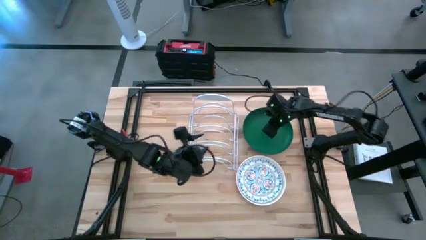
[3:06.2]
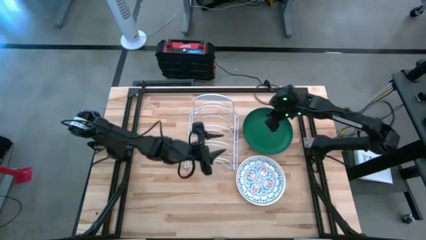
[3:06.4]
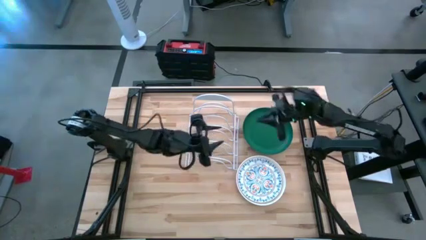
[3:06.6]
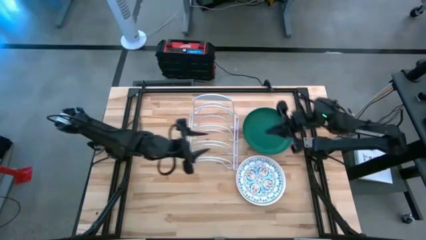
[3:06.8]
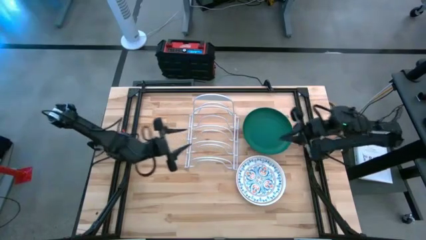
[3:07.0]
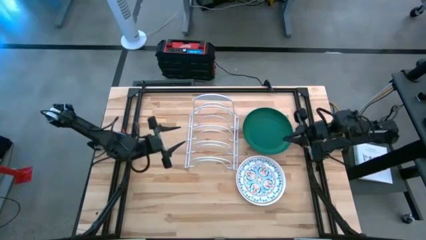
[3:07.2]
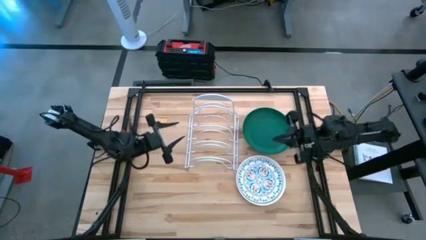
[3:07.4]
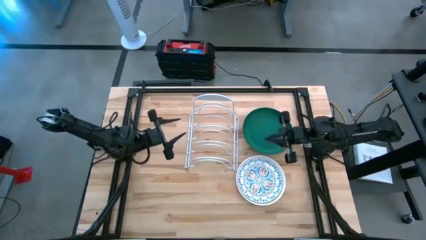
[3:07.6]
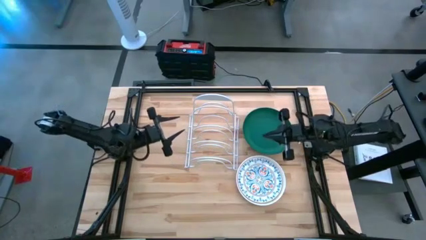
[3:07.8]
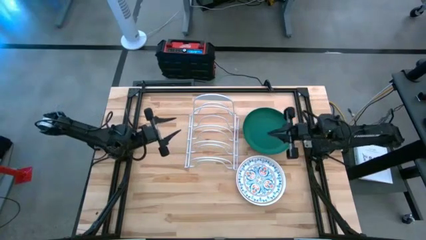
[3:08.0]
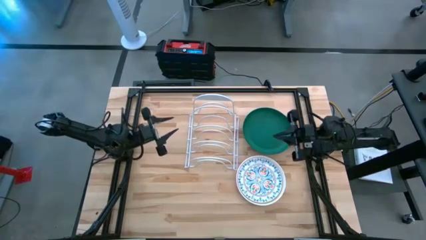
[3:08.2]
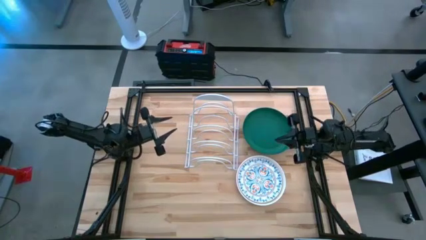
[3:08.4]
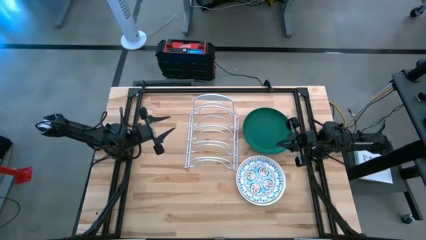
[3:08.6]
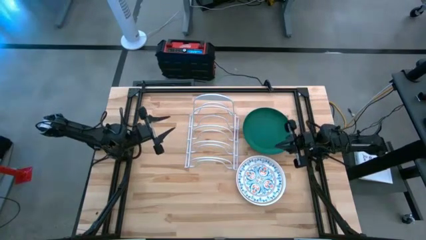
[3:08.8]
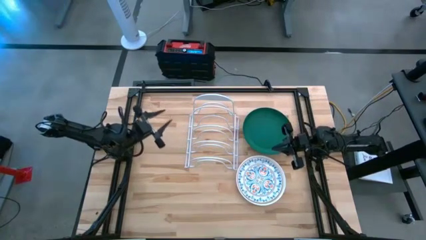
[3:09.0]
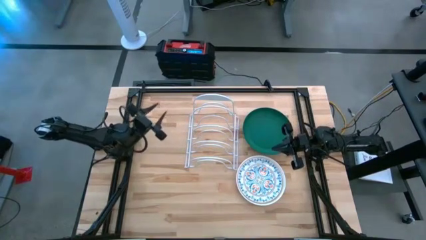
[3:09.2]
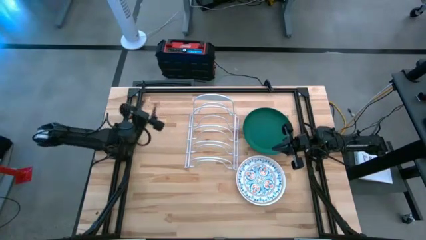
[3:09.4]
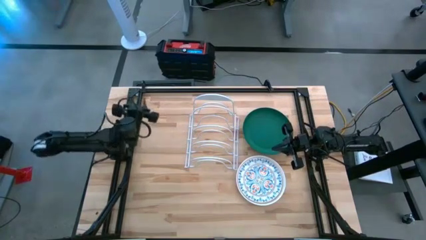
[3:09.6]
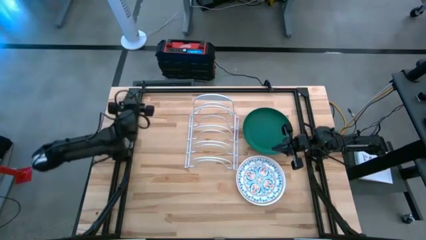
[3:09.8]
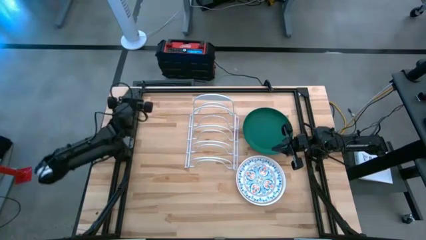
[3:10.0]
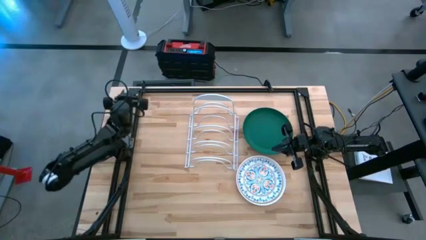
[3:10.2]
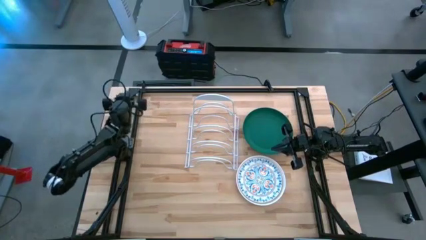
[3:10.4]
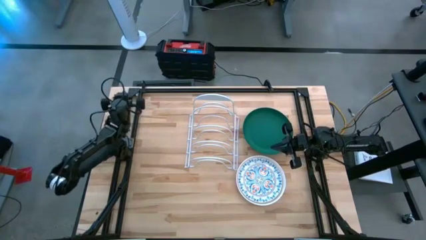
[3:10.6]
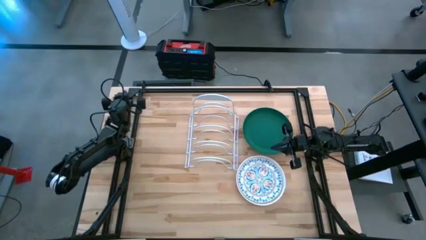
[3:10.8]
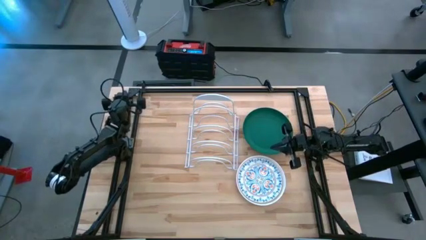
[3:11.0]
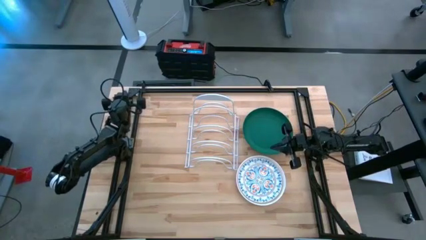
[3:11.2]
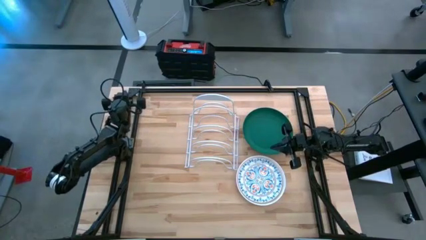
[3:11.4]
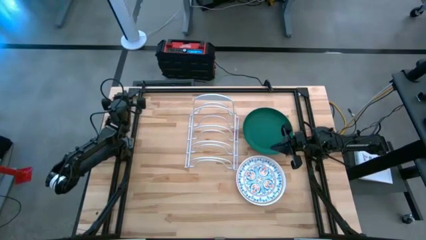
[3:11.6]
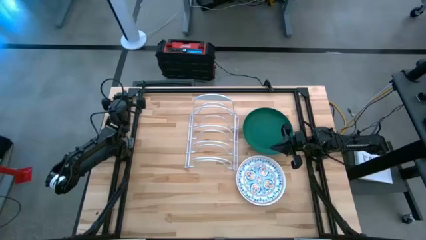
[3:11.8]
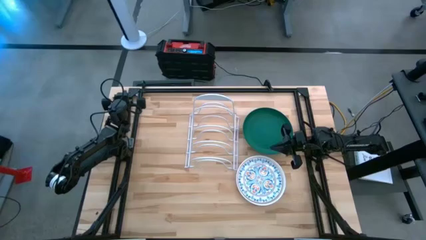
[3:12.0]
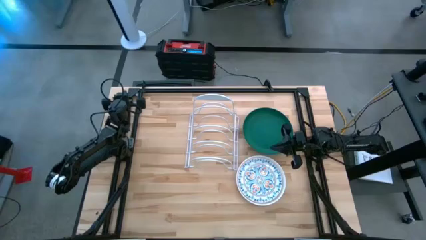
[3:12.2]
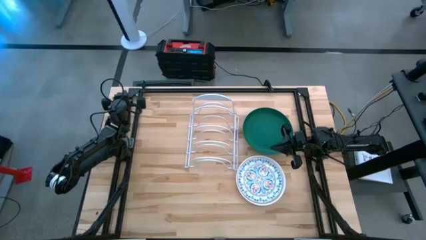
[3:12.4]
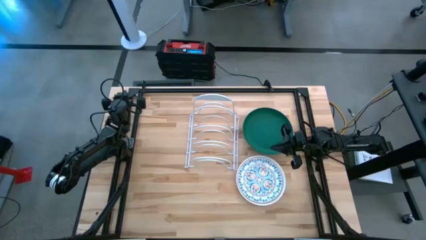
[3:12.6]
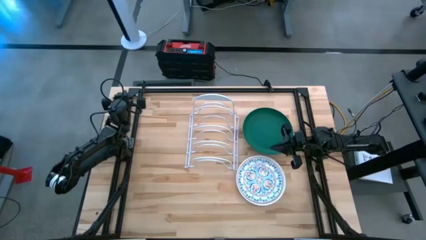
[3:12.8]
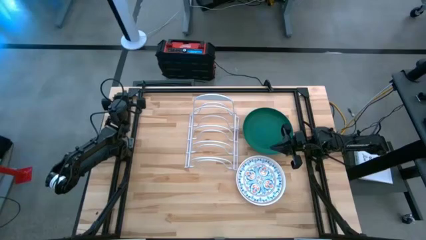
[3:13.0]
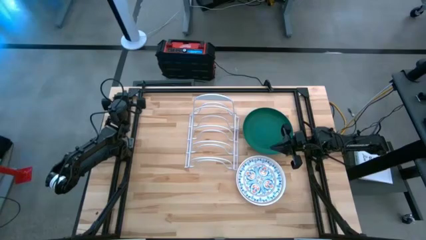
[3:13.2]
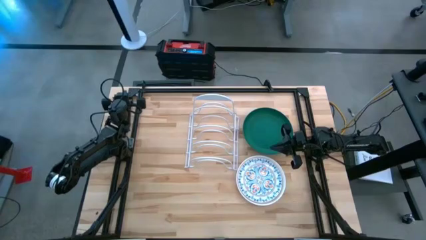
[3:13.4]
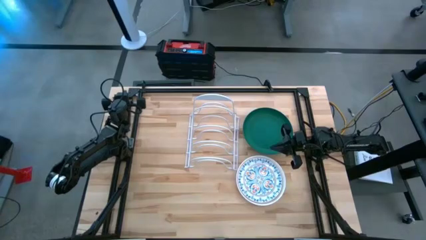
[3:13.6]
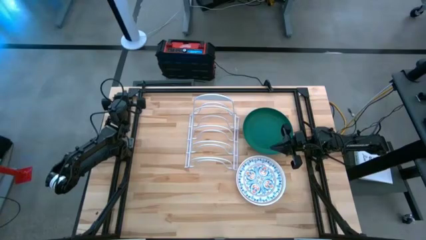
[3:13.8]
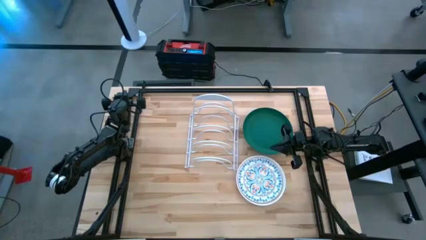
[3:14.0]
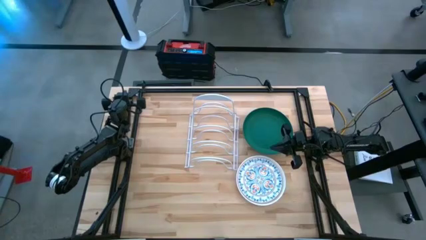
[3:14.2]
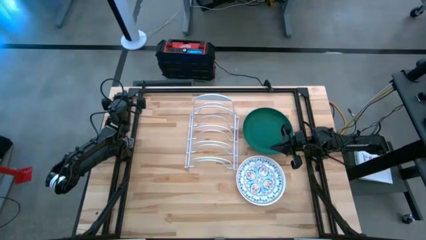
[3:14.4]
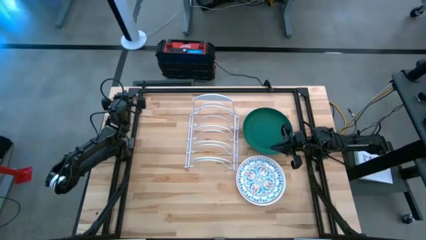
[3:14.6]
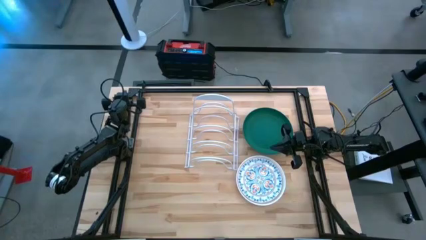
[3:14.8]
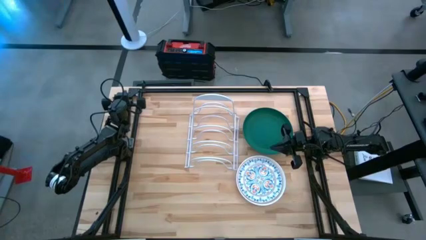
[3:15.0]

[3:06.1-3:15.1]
Task: Sort dishes
Return to Home Position

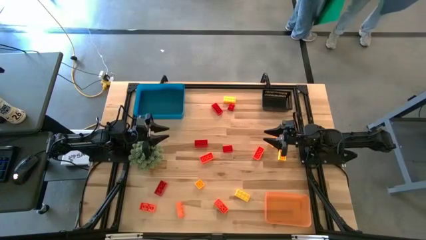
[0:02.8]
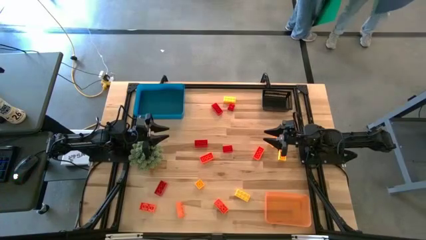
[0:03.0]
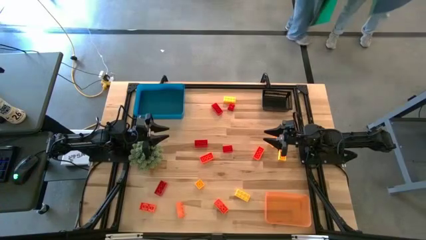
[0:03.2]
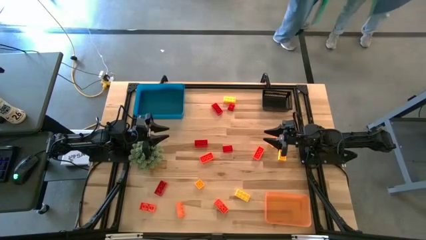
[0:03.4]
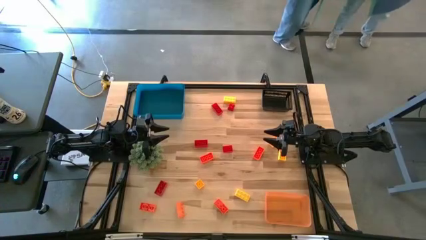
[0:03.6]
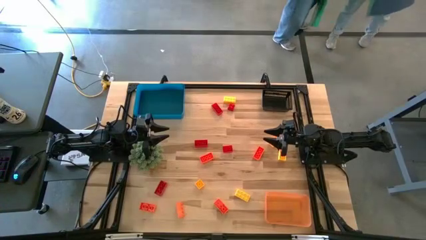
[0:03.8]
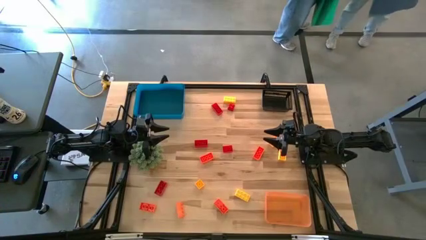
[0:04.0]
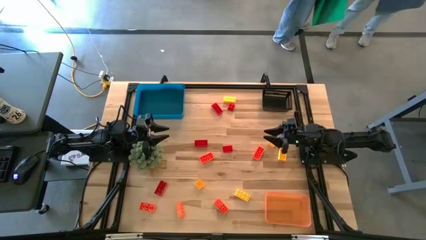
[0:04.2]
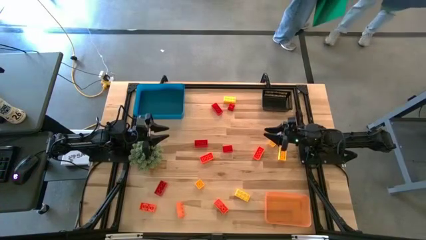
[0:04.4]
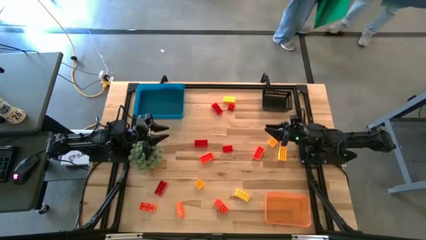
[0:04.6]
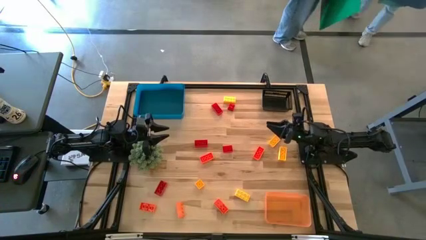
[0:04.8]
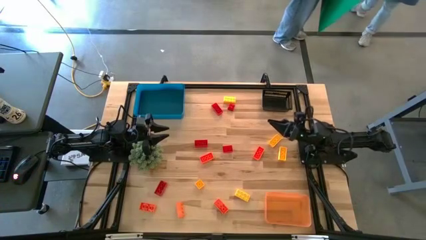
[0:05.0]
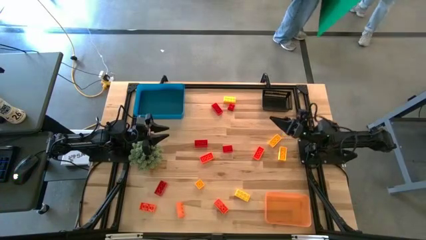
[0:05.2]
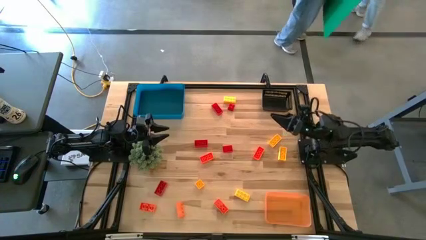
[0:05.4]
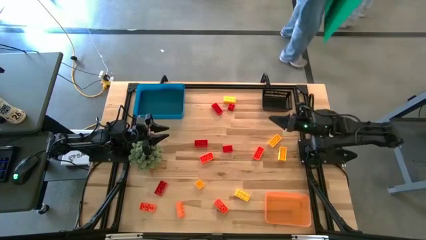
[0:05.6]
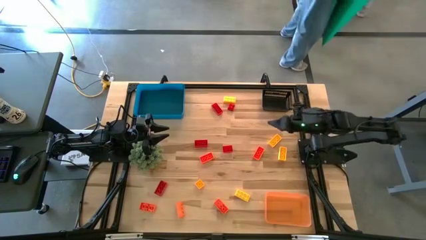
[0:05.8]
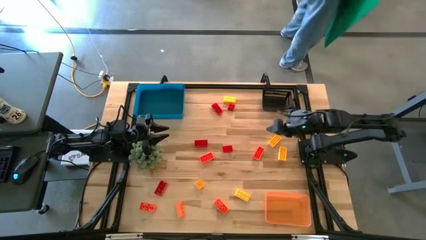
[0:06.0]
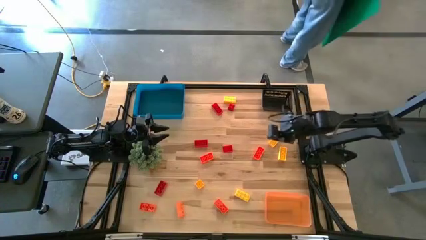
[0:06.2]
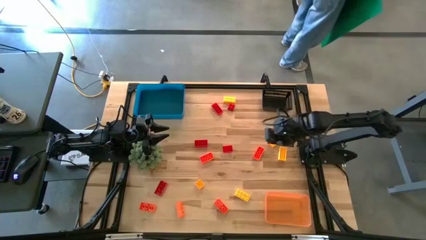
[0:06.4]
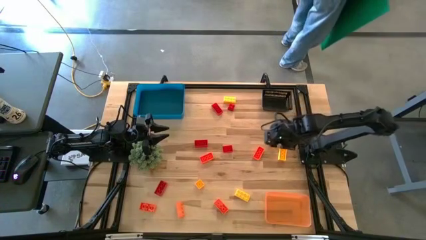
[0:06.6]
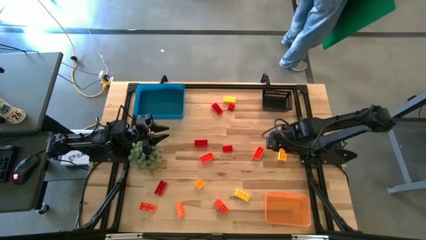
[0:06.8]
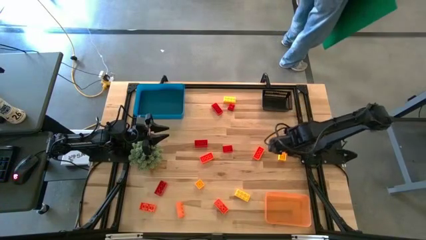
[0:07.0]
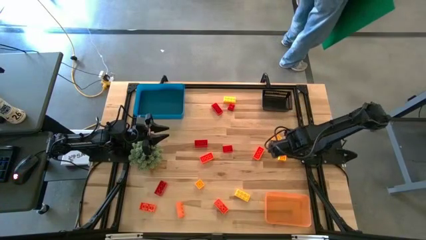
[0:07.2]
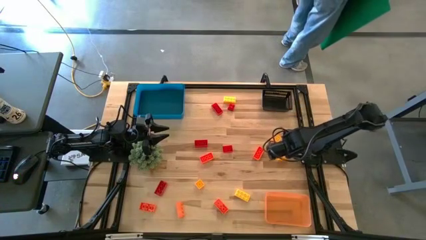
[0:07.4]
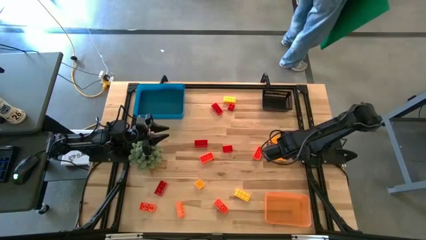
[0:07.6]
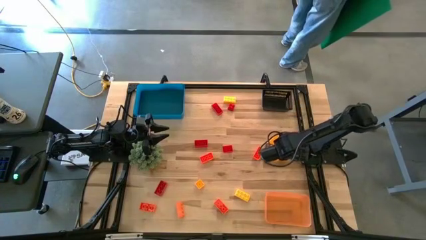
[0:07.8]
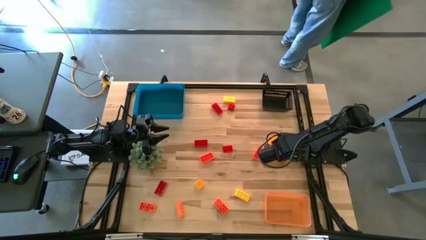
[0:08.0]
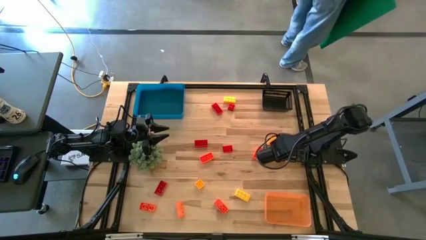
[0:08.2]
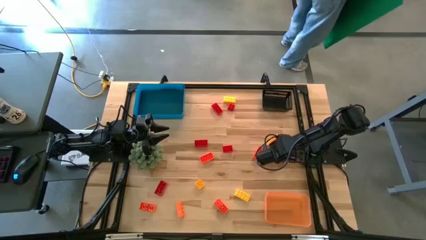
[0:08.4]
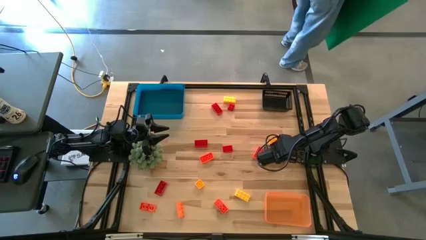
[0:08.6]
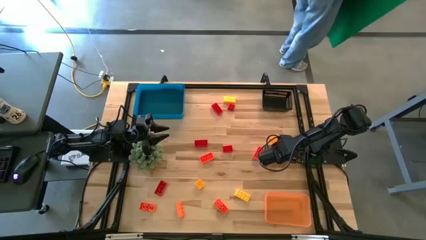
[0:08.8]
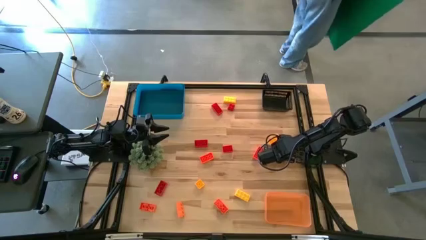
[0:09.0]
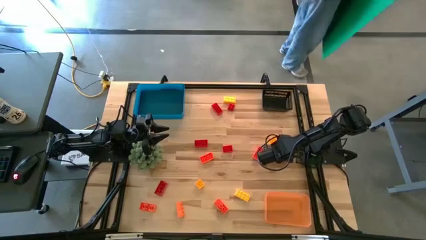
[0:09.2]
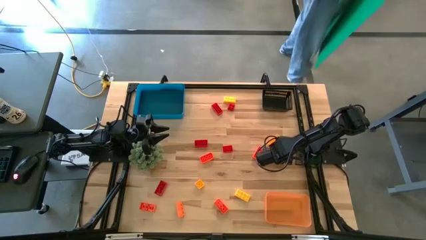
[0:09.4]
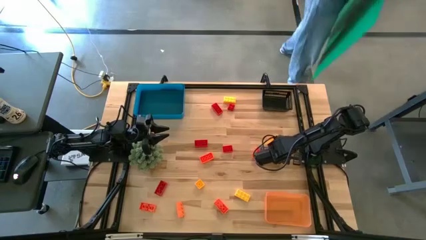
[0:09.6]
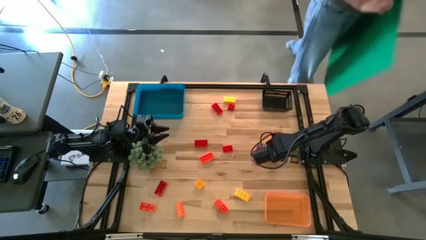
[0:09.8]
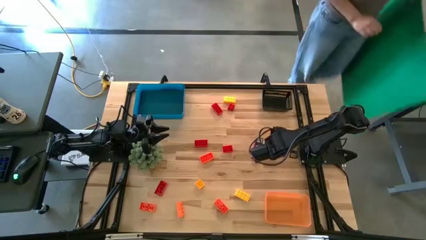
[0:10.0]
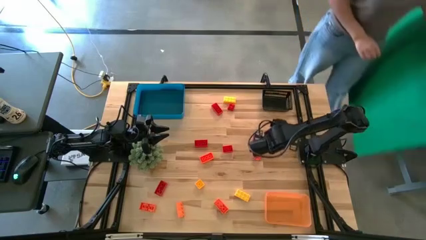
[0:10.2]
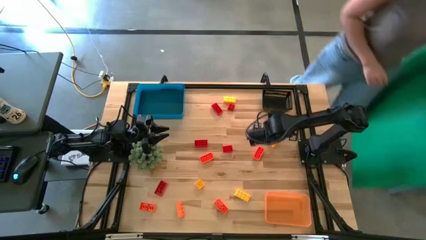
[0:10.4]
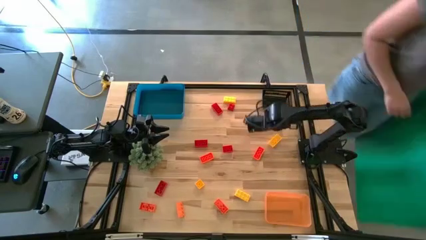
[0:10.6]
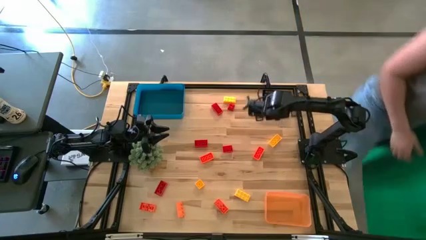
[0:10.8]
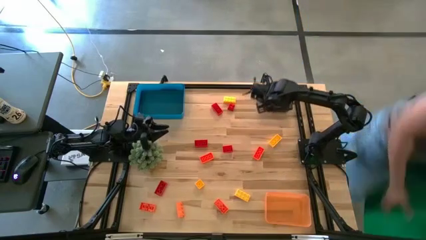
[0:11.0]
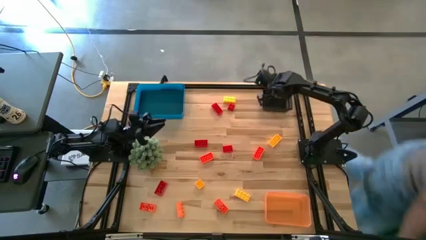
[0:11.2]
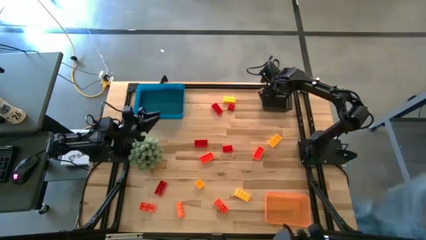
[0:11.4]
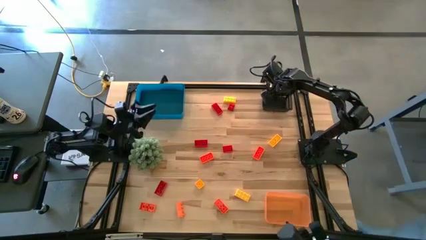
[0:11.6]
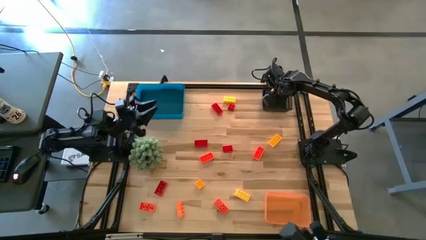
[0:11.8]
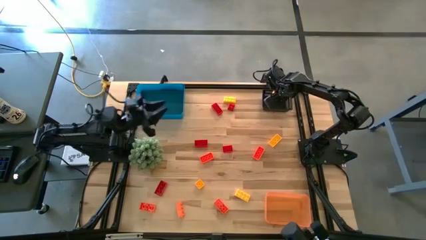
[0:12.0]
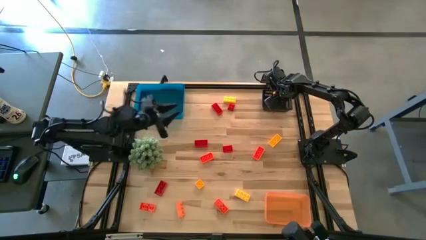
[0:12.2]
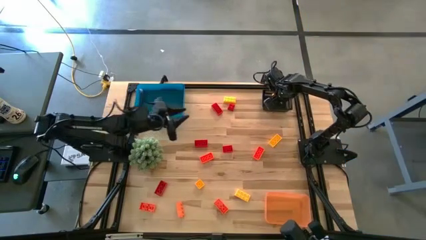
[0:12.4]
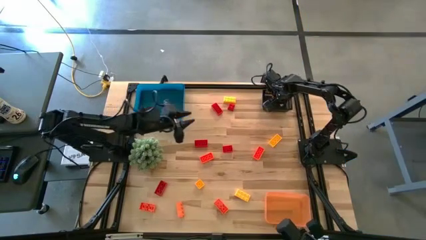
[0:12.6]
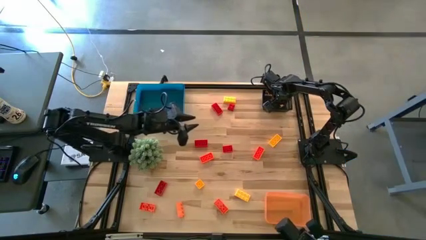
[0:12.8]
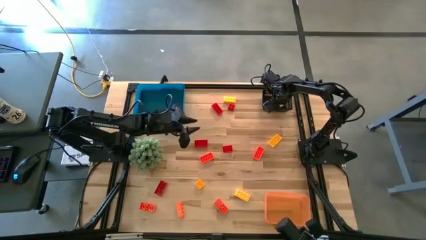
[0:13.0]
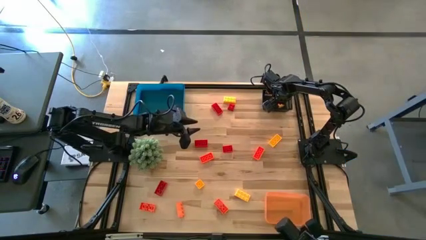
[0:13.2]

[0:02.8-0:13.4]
Task: Sort & place blocks by color
Put the yellow game piece into the black bin
